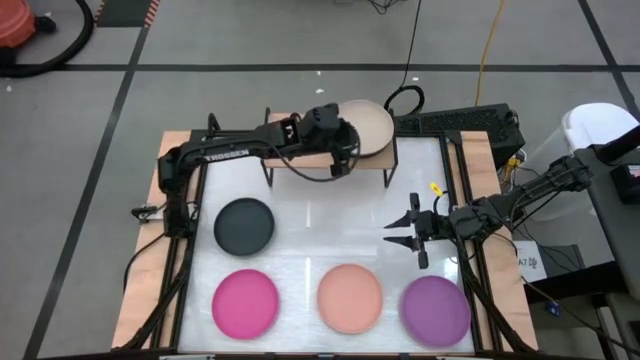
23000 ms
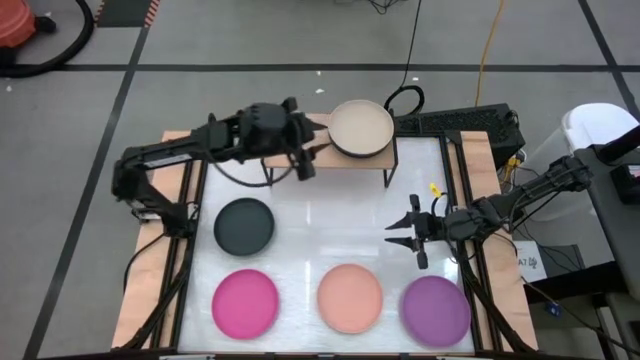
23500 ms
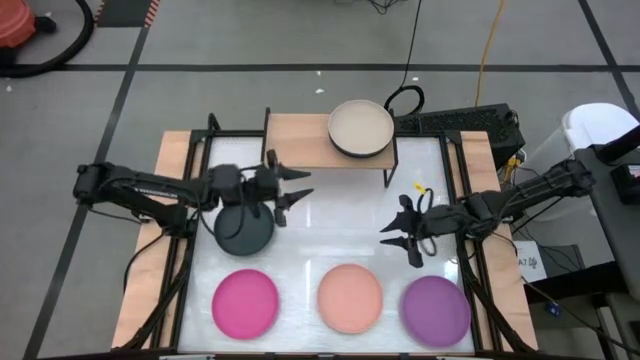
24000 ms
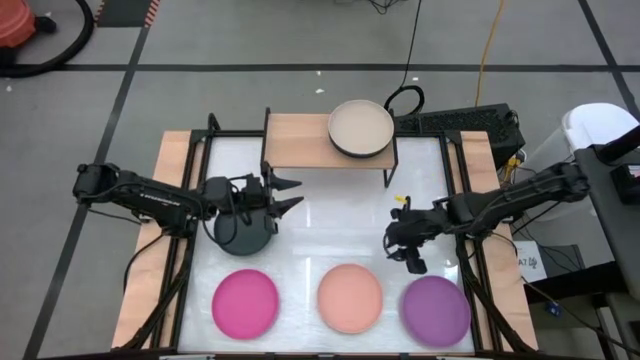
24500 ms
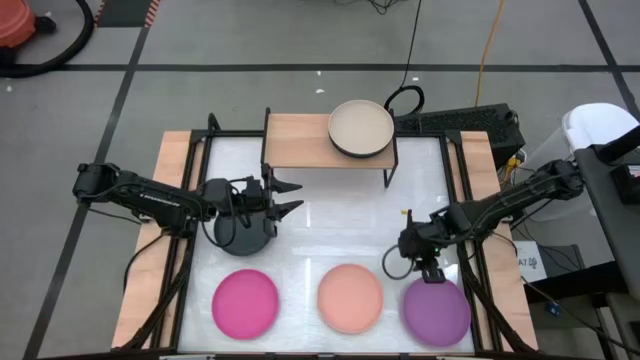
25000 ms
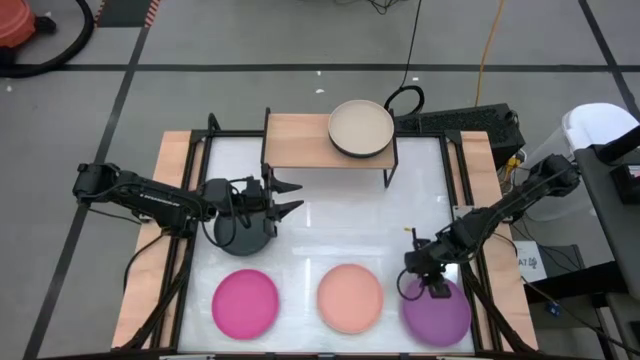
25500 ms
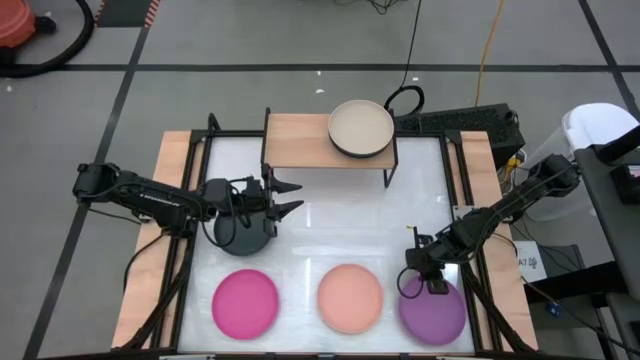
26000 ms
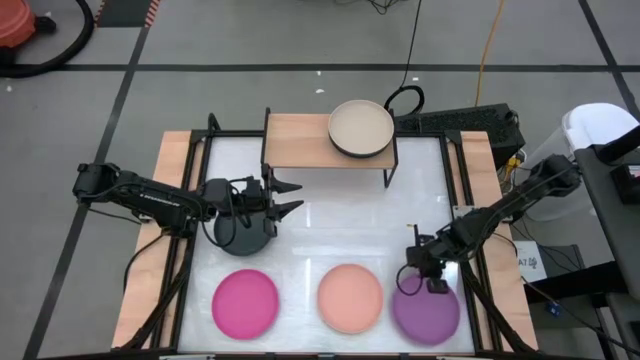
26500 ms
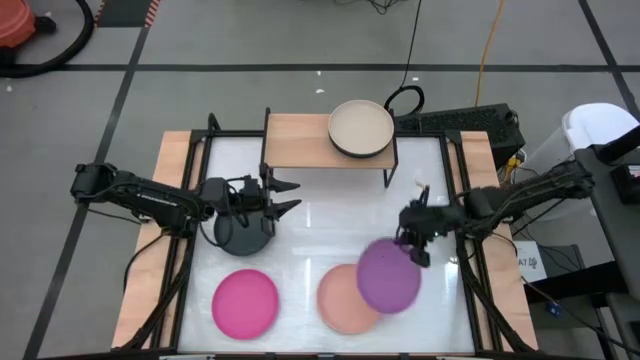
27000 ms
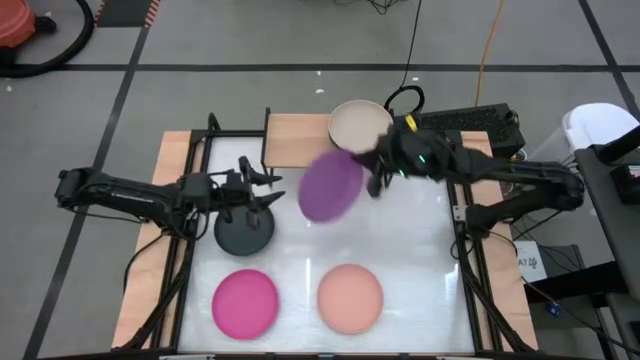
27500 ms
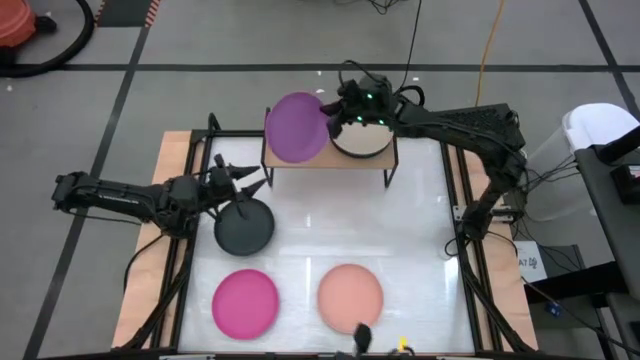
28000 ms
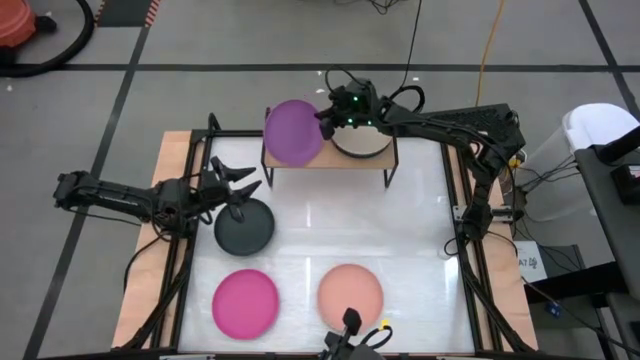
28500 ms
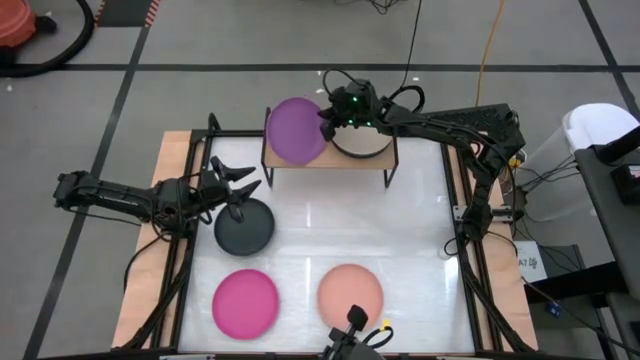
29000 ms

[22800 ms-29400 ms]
Task: Place and stack plates onto a shelf
Put the violet plate on the shelf

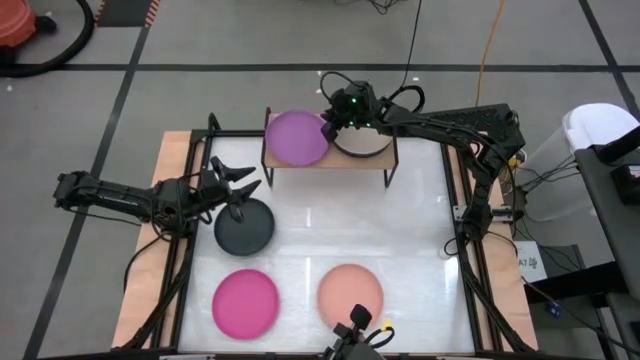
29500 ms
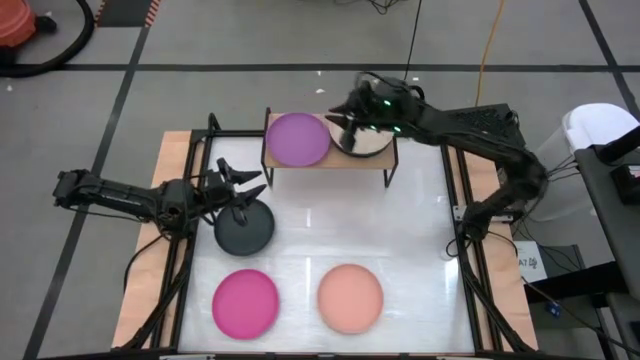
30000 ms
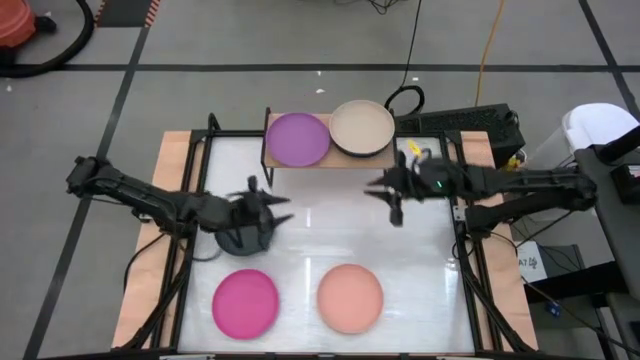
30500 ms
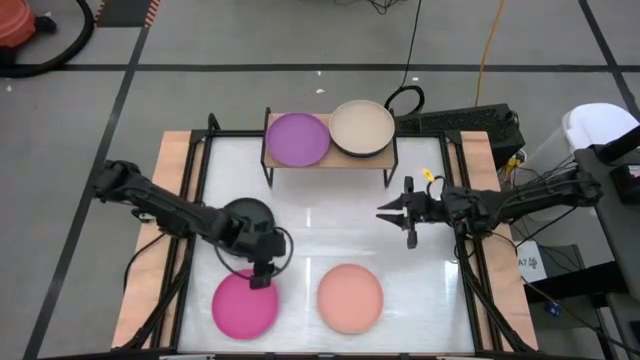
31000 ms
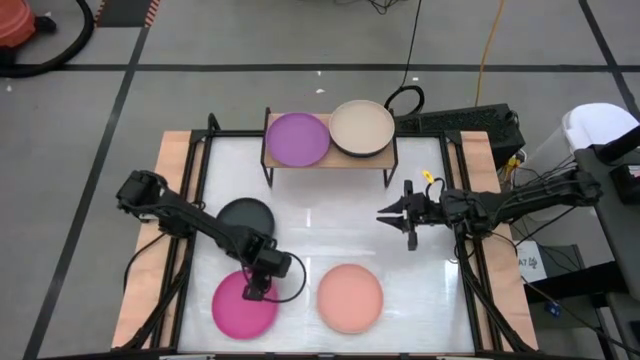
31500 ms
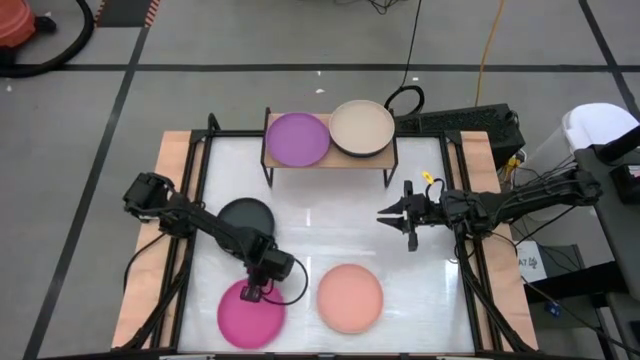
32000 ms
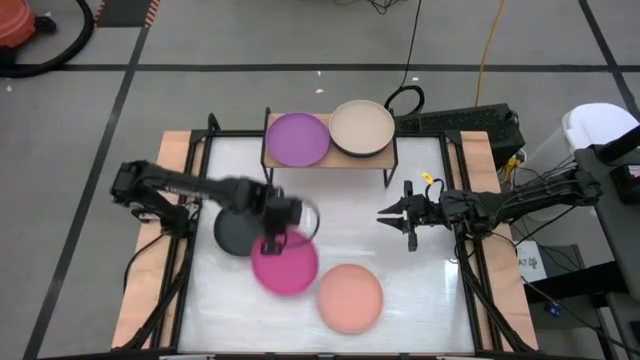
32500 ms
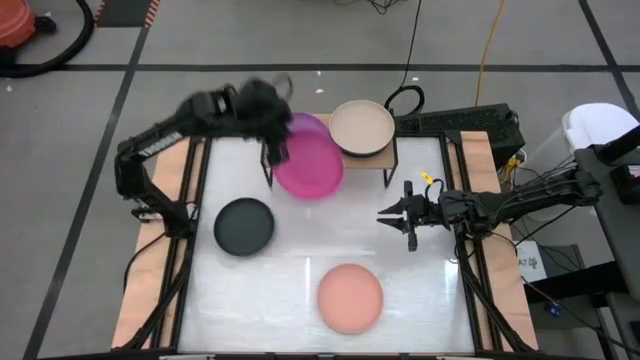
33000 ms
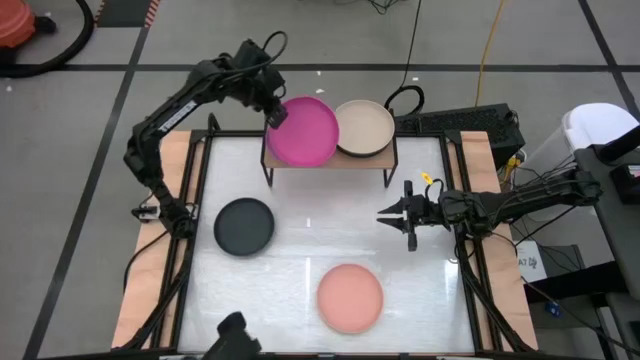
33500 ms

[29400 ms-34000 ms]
Put the pink plate on the violet plate on the shelf

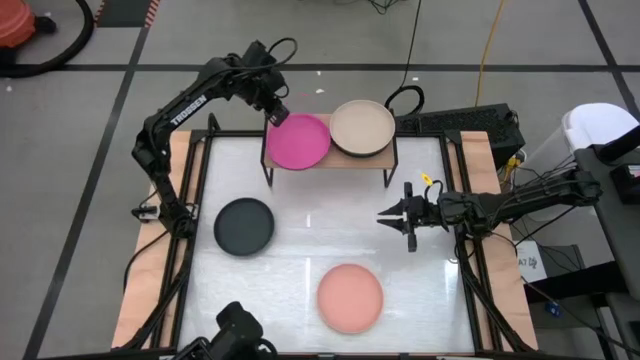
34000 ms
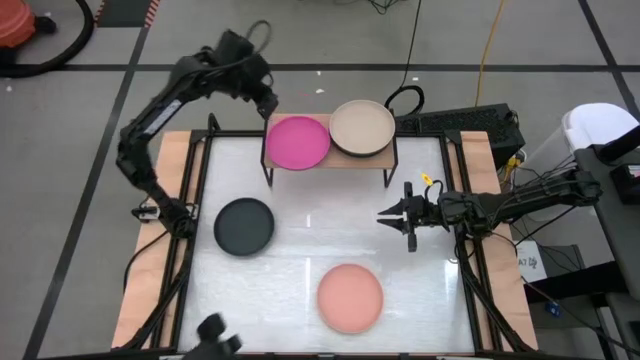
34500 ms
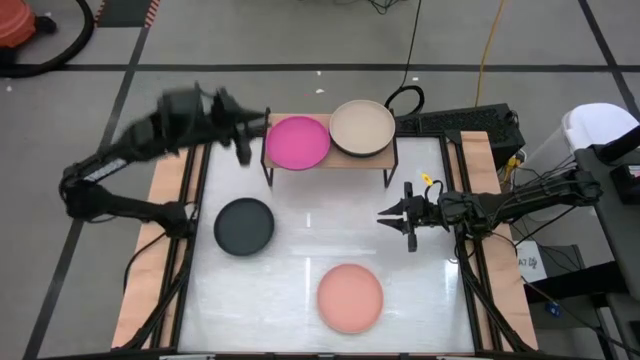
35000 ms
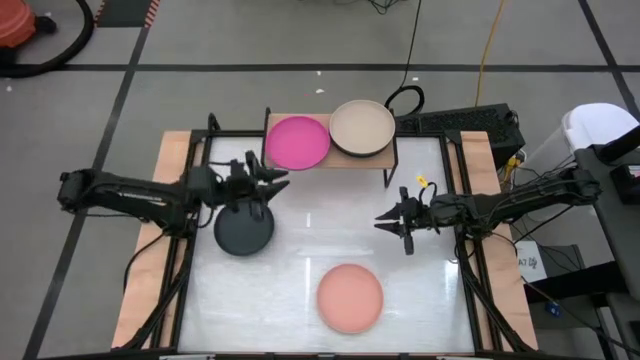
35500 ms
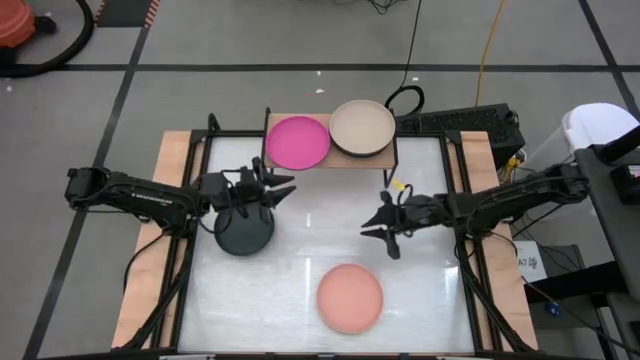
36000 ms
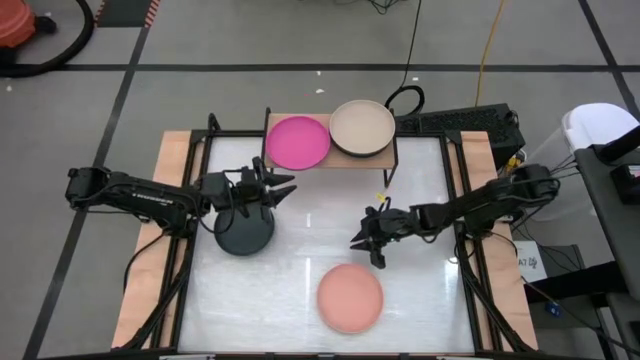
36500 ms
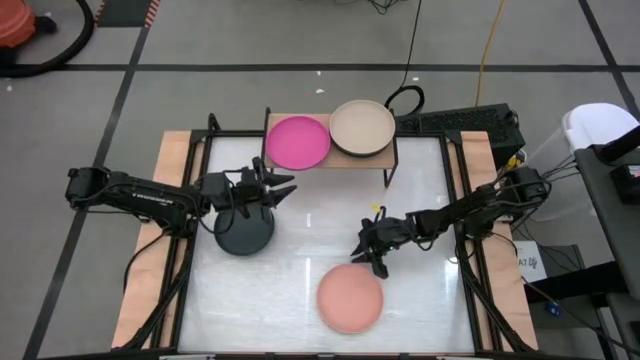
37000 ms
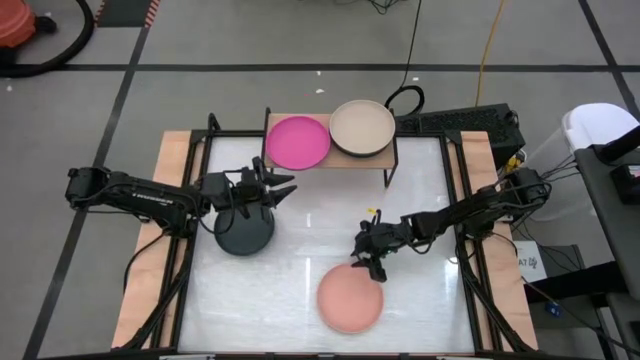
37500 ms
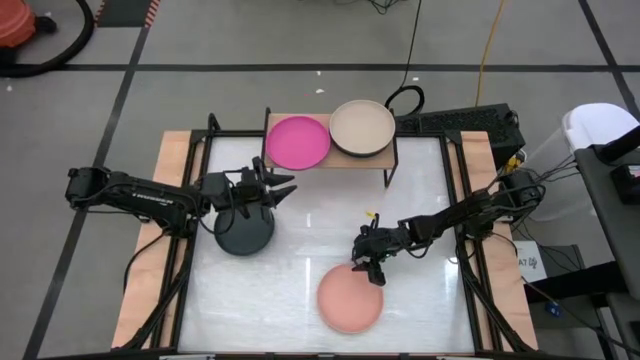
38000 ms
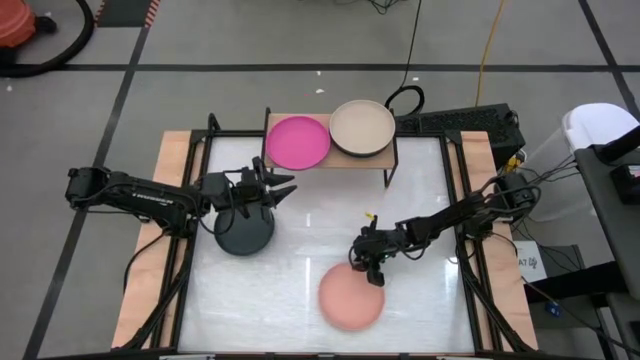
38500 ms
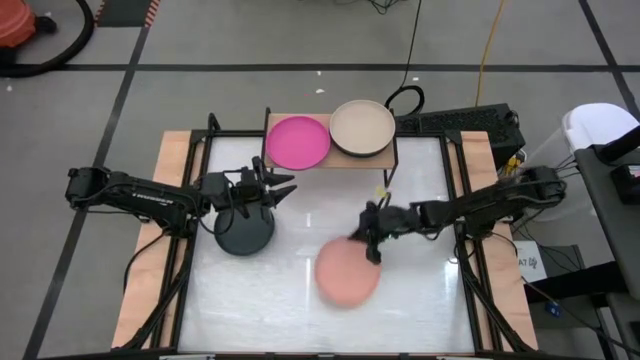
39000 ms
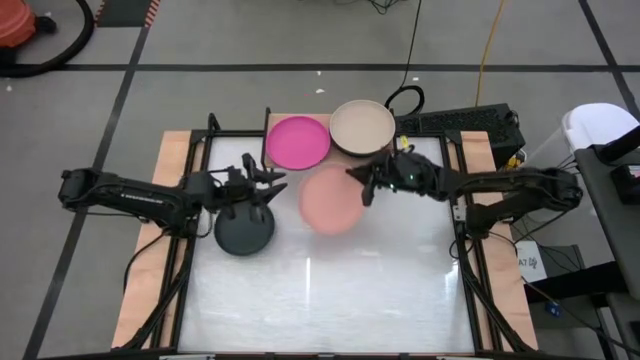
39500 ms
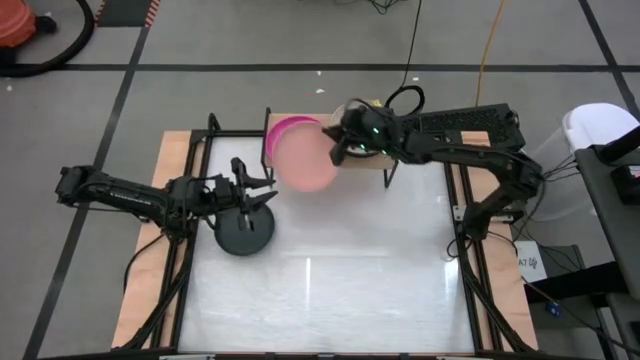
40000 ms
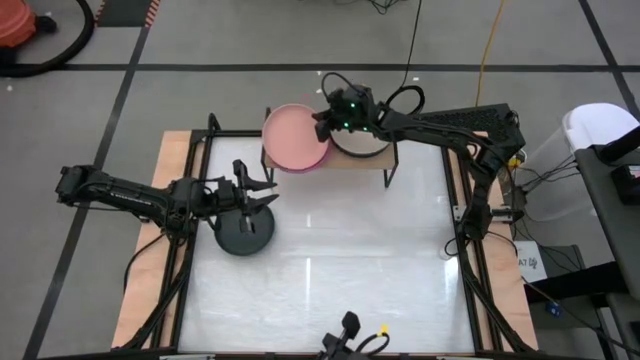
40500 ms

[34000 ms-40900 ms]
Put the light orange plate on the pink plate on the shelf

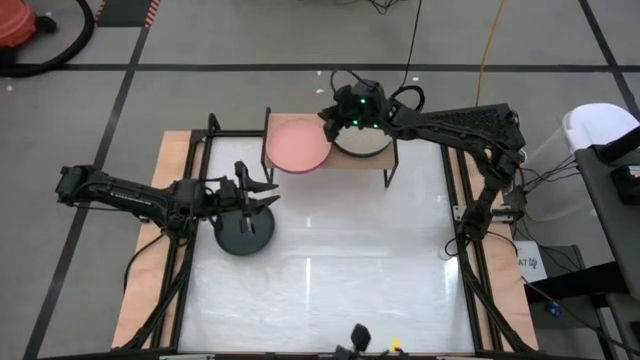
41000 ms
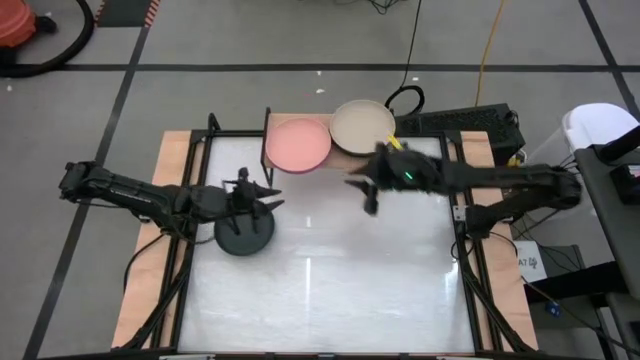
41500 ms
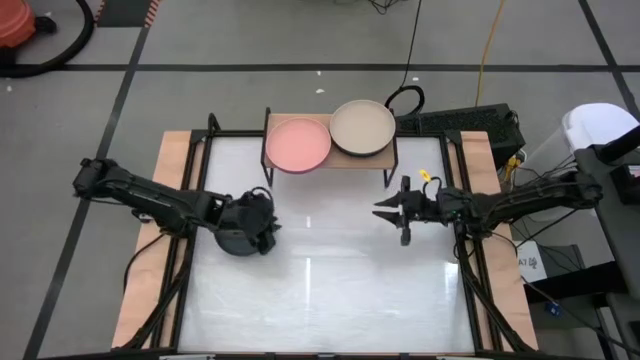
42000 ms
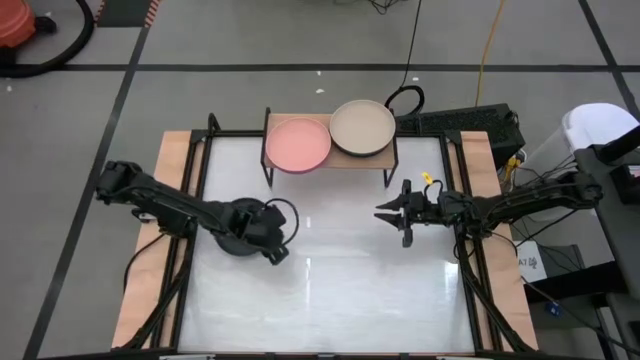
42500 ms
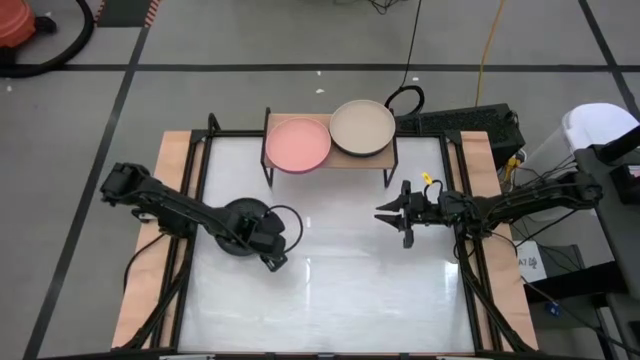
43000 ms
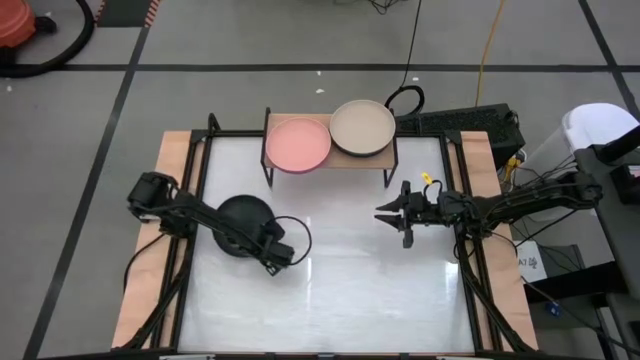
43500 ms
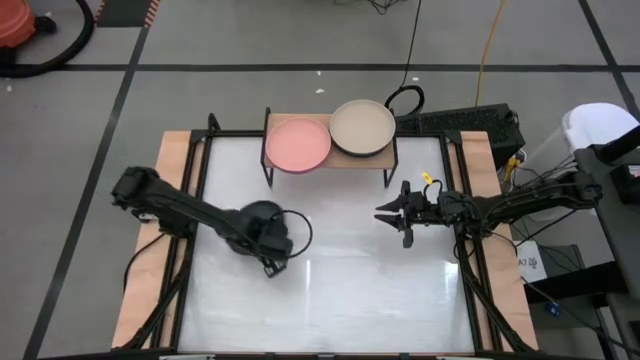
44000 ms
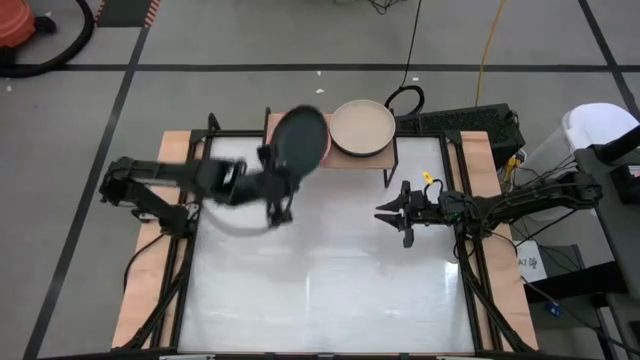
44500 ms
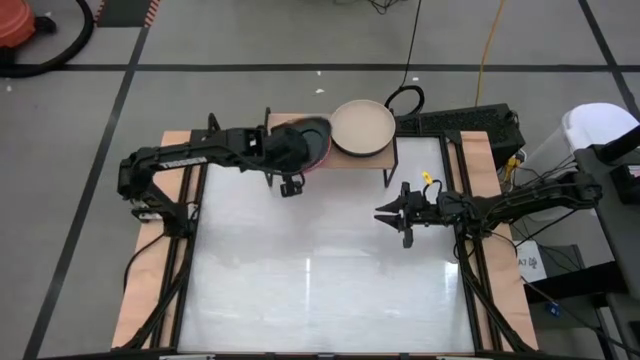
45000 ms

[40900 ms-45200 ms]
Put the black plate on the light orange plate on the shelf
